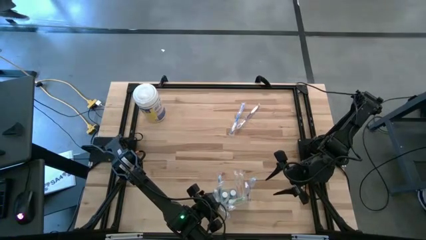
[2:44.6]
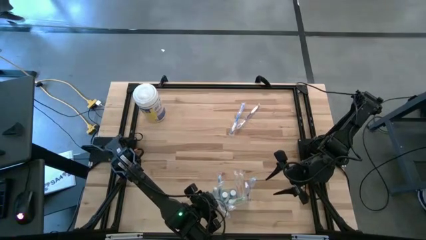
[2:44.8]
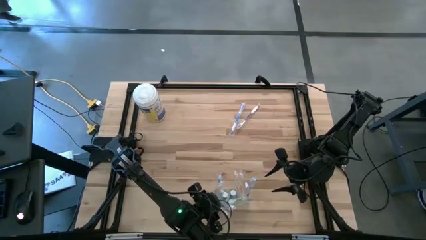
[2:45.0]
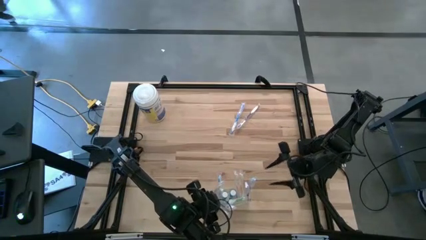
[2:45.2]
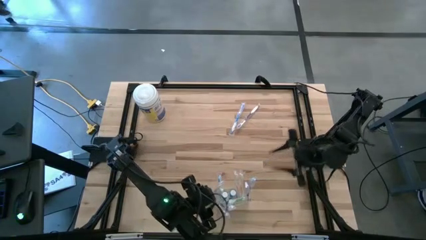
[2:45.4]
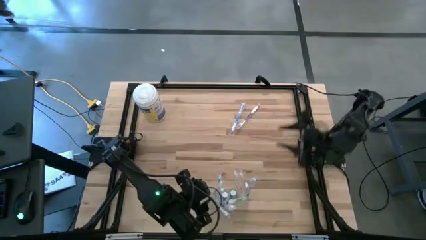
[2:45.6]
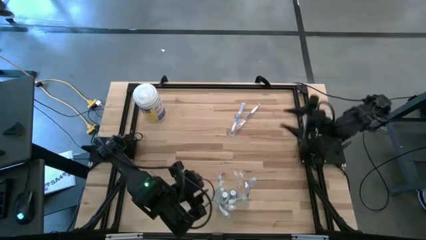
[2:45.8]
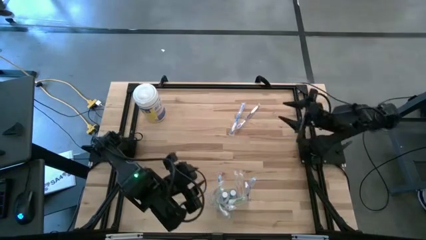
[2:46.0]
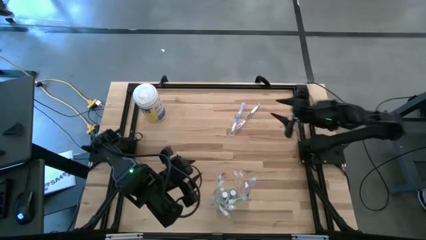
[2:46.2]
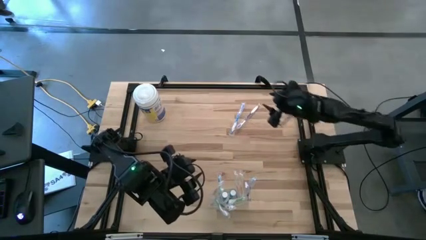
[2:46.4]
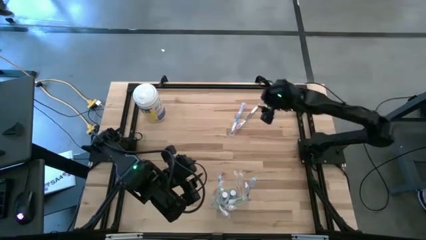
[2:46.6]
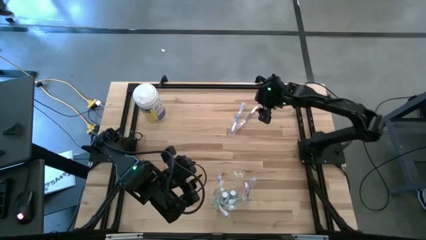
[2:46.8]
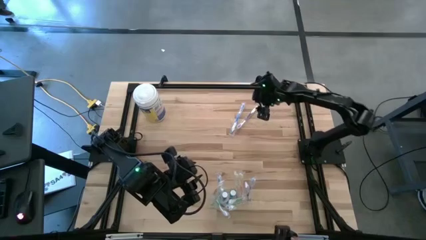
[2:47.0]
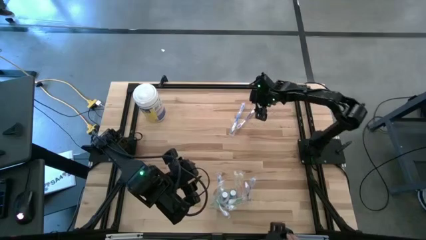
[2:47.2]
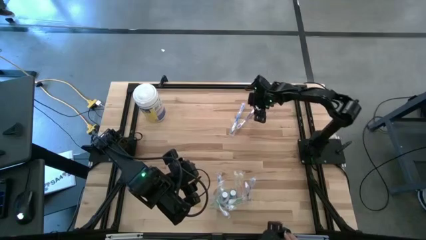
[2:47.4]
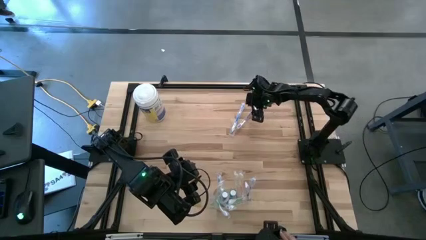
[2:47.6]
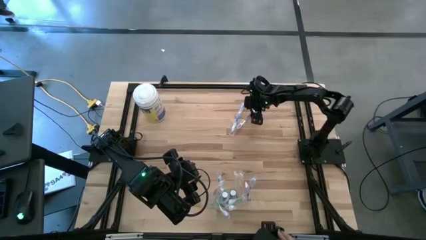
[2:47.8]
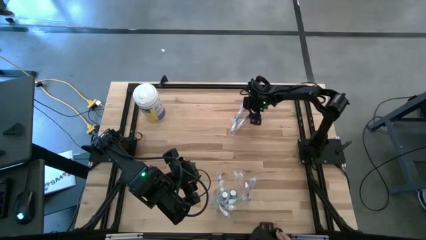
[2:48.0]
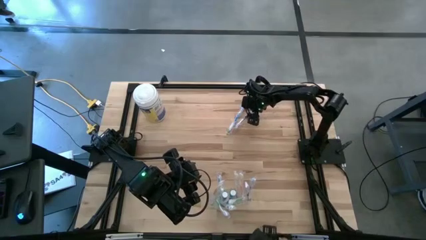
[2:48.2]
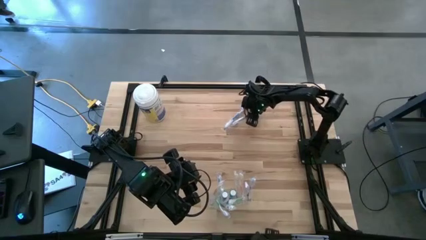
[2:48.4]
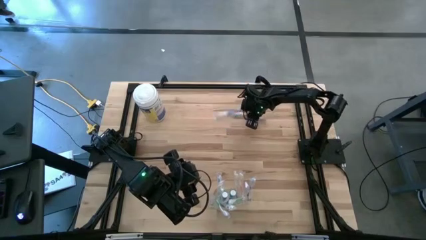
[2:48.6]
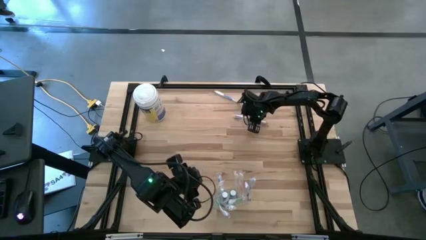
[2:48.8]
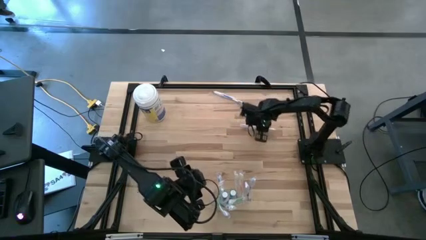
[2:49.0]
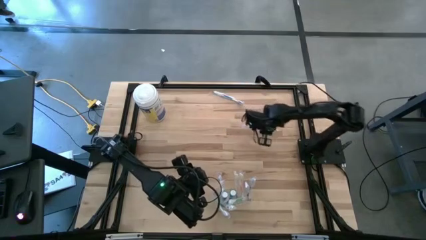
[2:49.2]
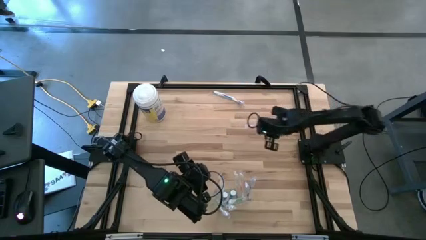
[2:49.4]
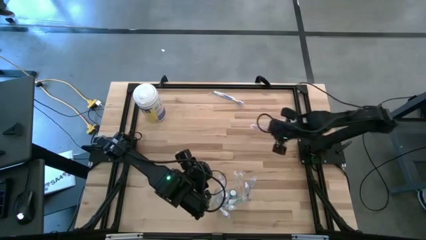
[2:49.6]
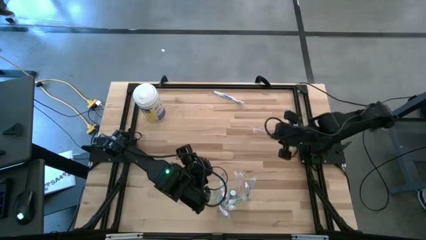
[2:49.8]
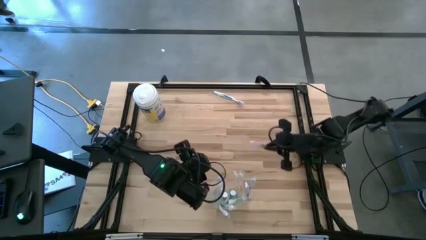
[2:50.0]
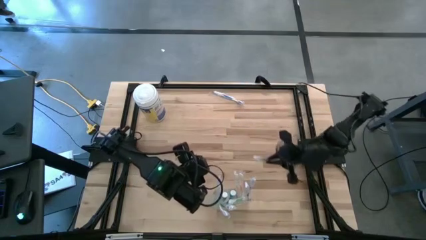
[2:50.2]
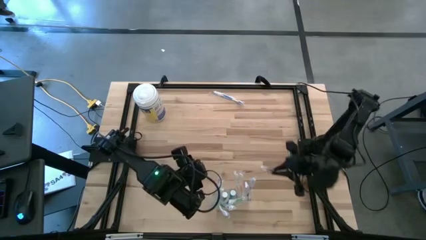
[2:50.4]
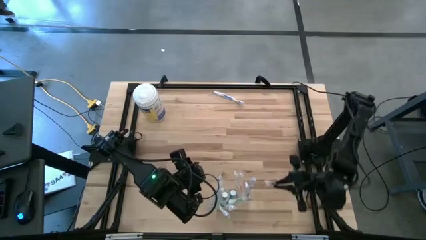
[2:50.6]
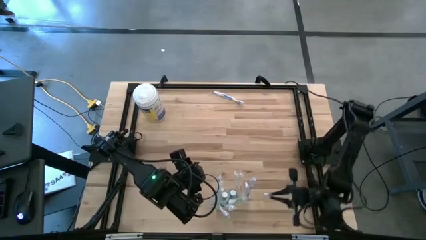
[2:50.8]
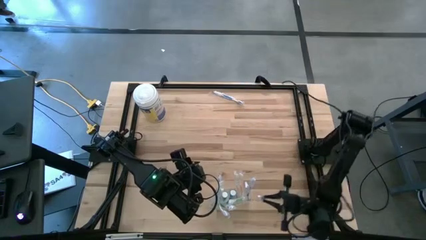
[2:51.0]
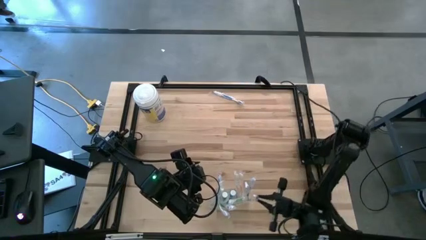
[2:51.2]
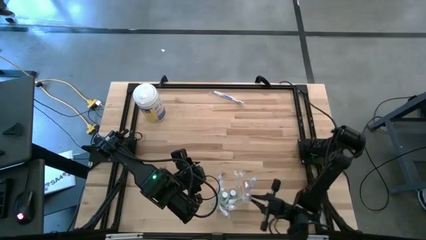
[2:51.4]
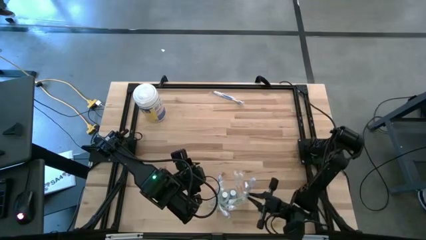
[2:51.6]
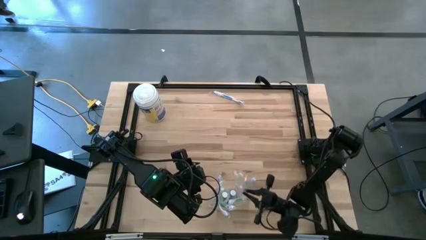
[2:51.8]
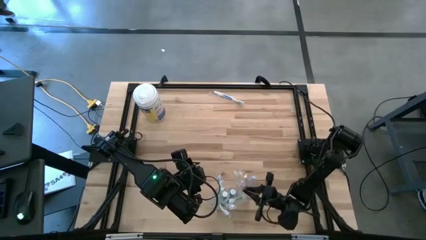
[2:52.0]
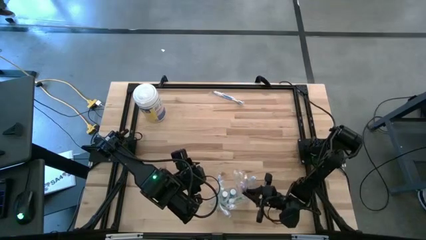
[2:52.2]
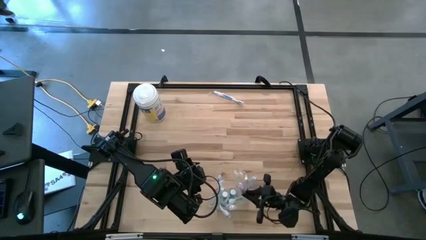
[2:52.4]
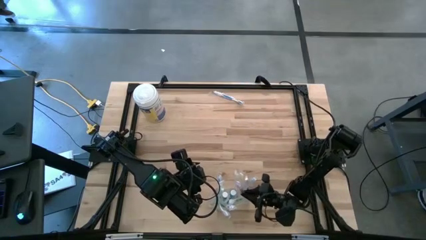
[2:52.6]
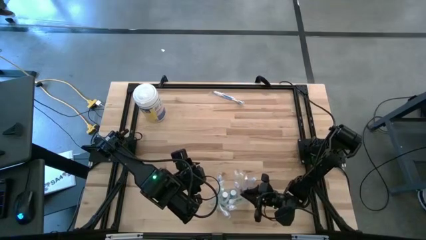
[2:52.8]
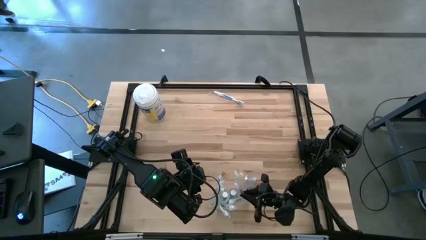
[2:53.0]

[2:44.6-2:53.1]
Task: Pick & Place toothbrushing station
Put the purple toothbrush into the transparent bin

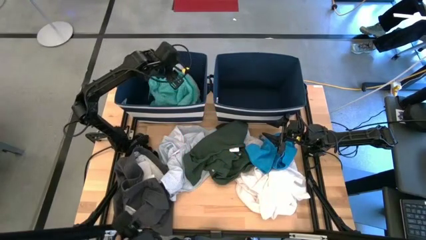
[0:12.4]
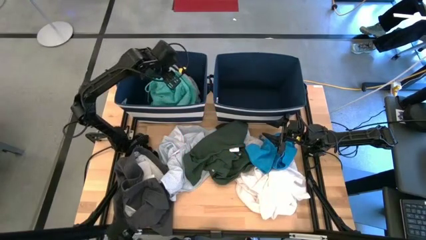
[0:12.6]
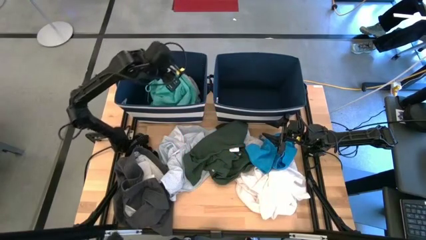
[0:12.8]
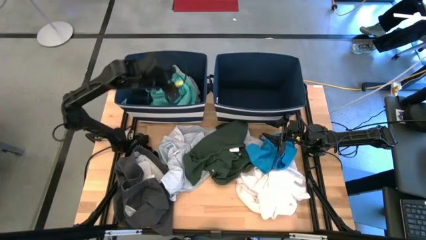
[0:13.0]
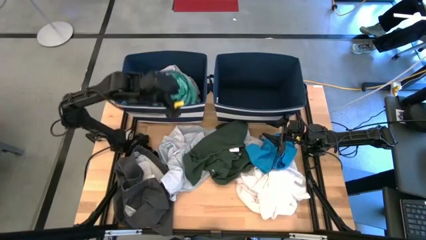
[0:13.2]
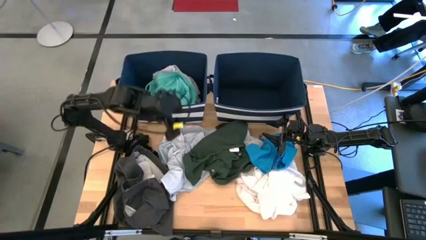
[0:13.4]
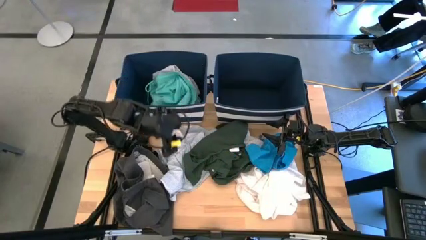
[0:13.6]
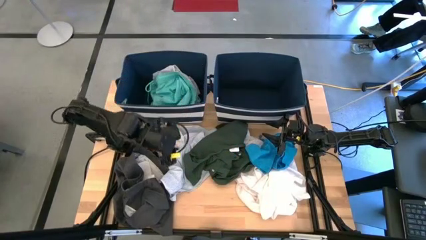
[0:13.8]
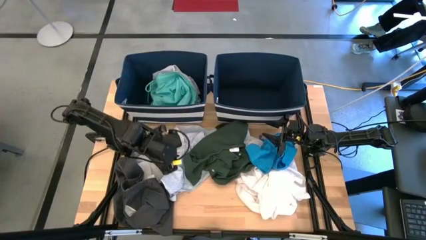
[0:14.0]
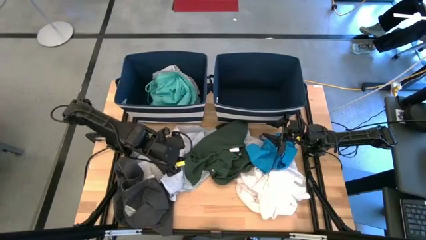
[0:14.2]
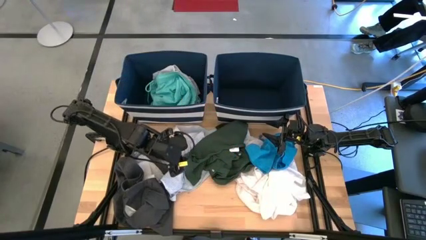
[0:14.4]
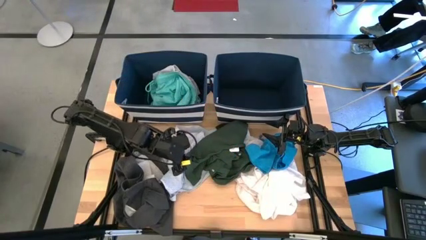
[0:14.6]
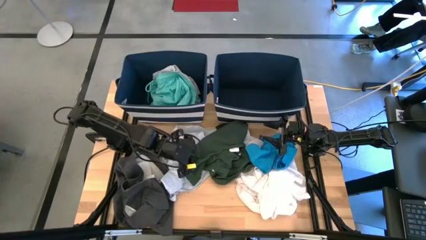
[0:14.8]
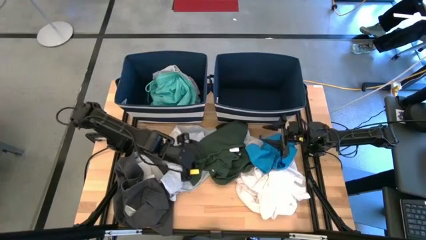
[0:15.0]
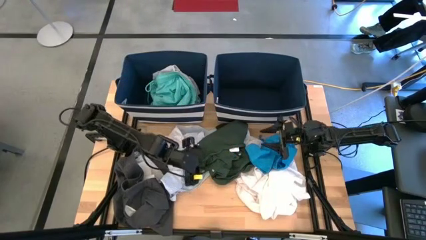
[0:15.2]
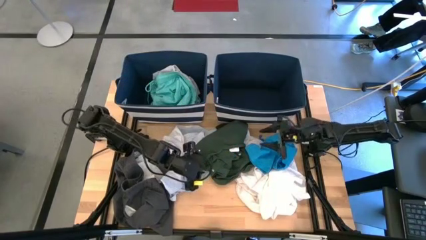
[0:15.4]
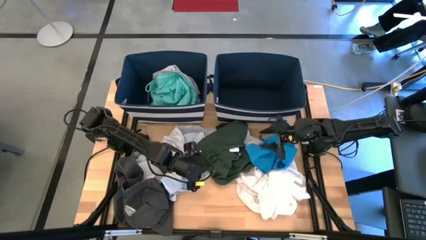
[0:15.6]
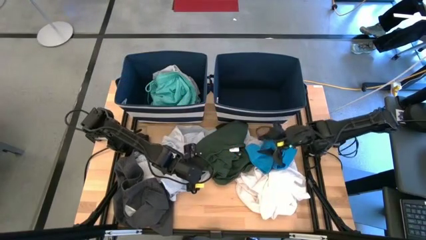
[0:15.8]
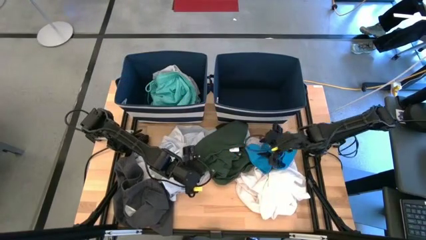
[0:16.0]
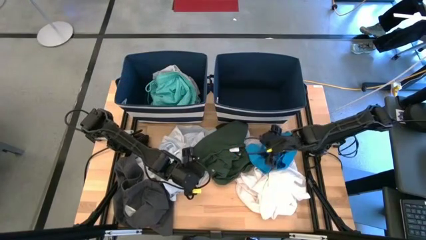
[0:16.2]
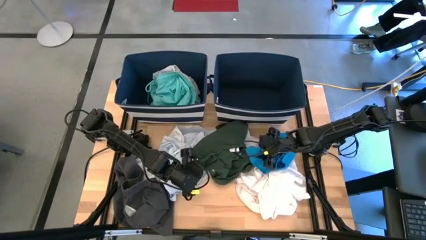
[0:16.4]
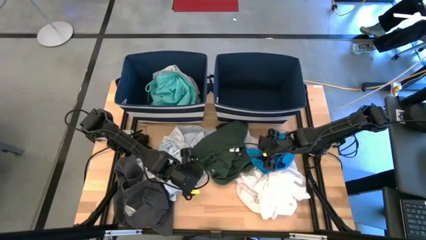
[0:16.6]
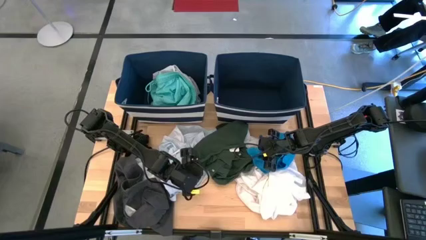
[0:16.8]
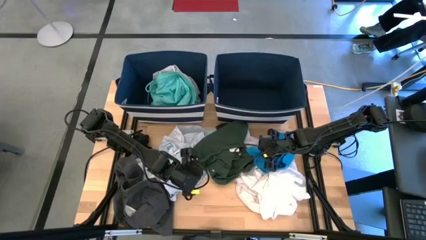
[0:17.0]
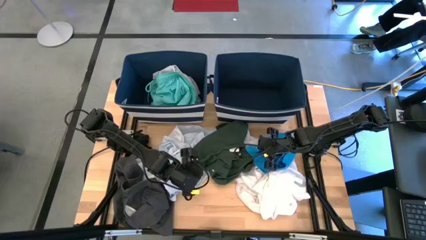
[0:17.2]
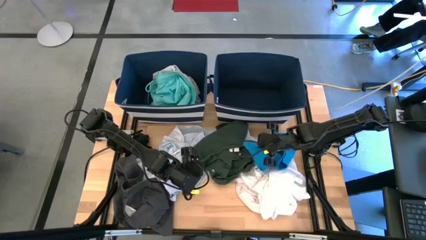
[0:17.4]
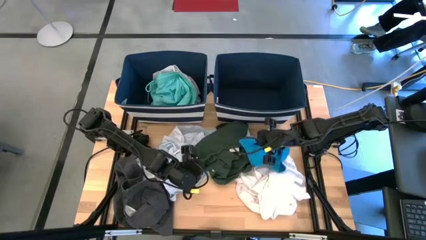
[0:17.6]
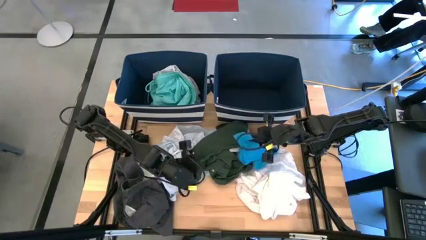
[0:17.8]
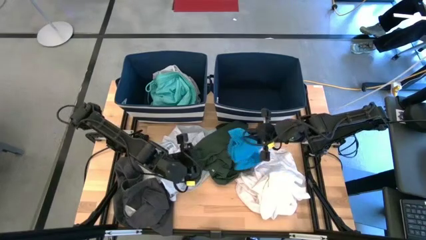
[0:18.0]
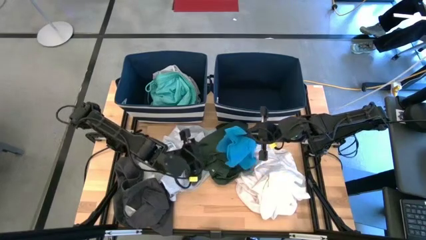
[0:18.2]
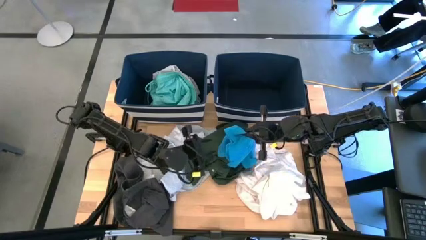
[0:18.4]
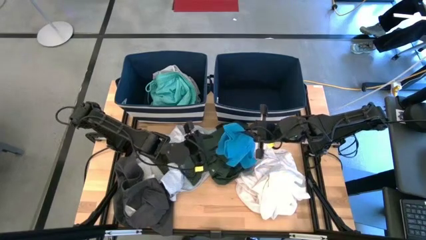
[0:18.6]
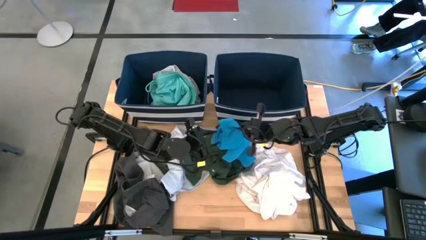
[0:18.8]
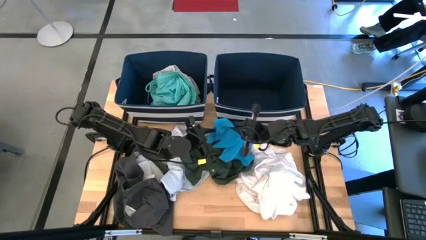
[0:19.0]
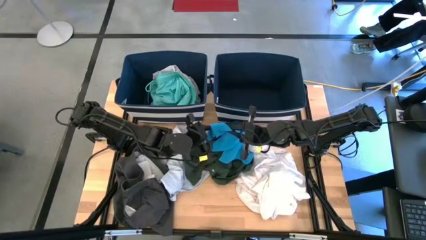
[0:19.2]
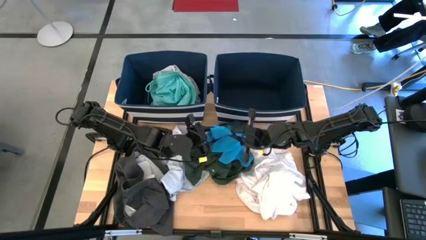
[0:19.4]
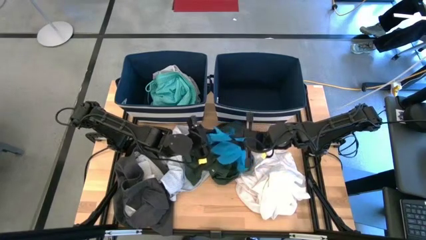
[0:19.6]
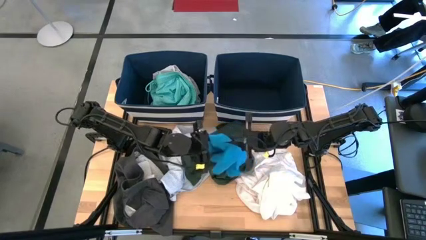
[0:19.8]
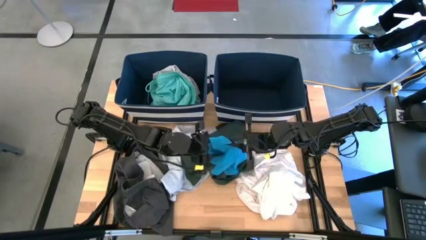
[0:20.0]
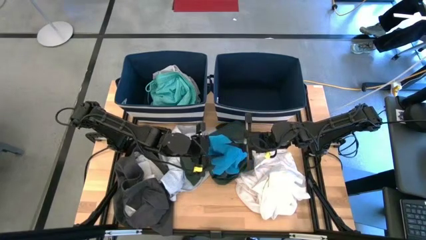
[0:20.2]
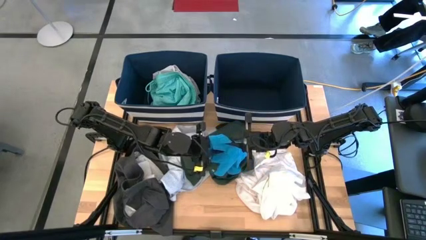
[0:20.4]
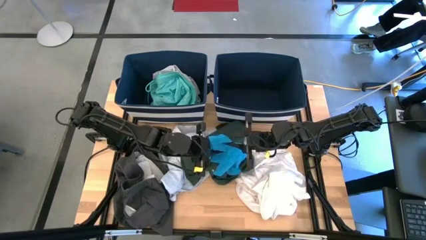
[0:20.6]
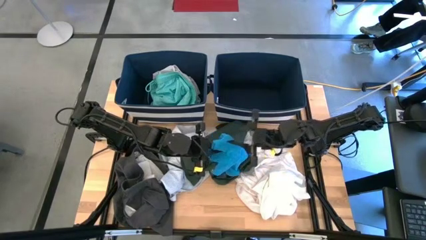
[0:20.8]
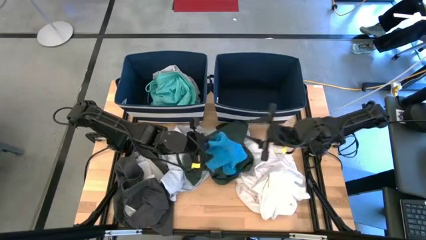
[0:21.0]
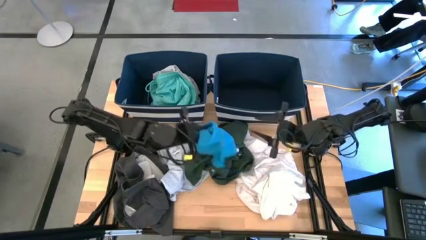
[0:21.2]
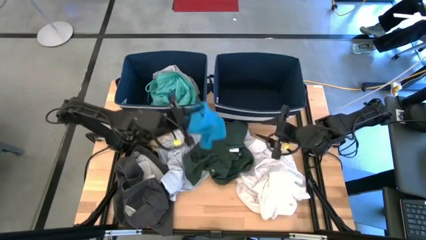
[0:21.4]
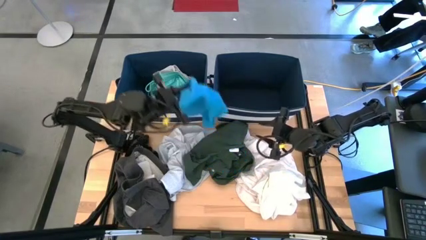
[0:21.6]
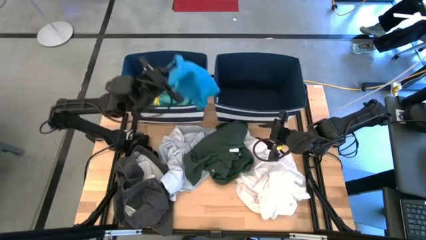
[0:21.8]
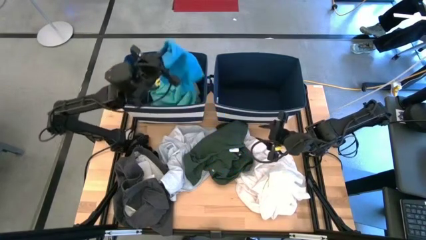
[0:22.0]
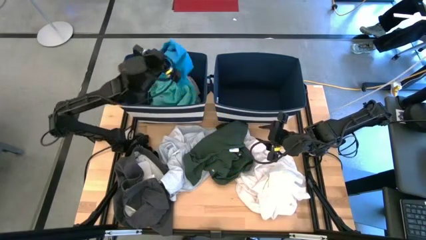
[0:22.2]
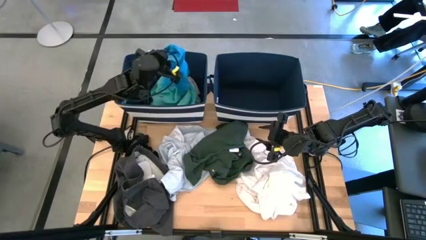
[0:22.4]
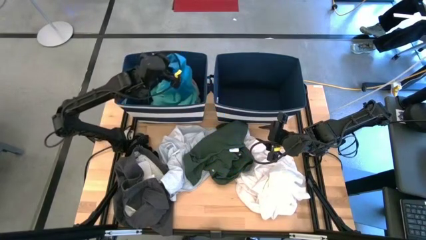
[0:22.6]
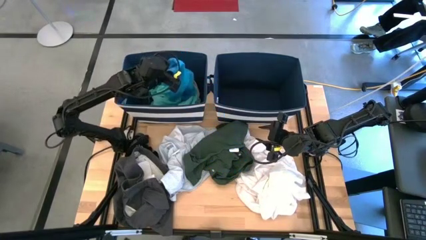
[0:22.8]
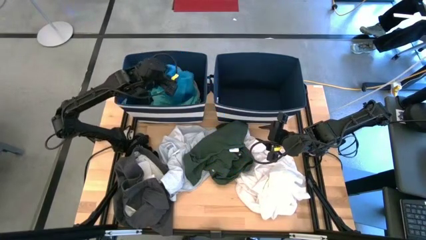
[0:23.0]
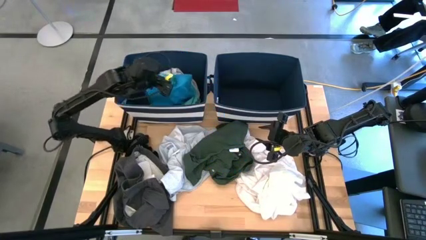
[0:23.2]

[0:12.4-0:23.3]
Task: Sort clothes
Put the blue shorts into the left laundry bin
